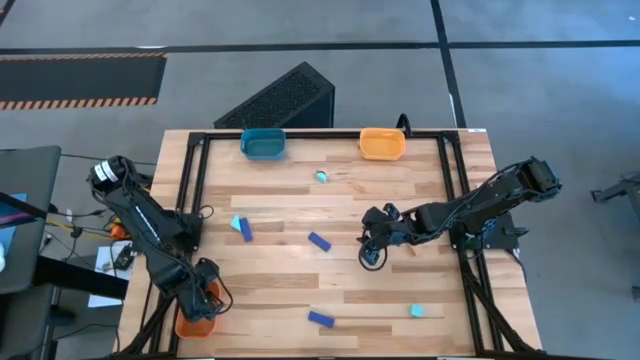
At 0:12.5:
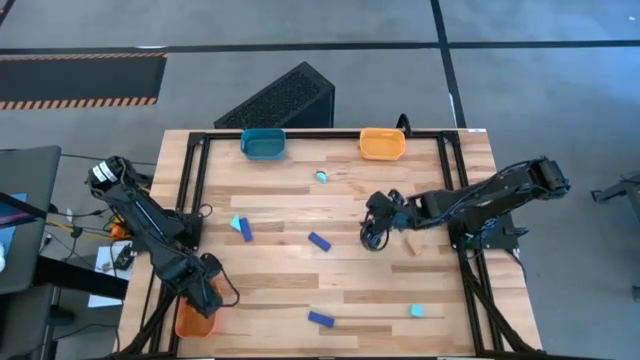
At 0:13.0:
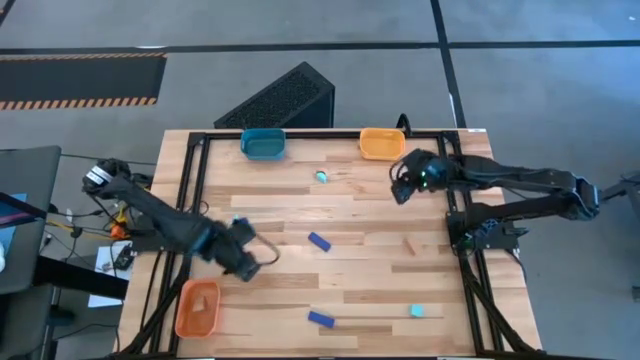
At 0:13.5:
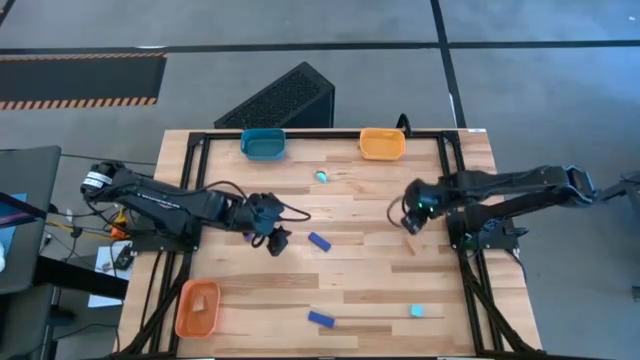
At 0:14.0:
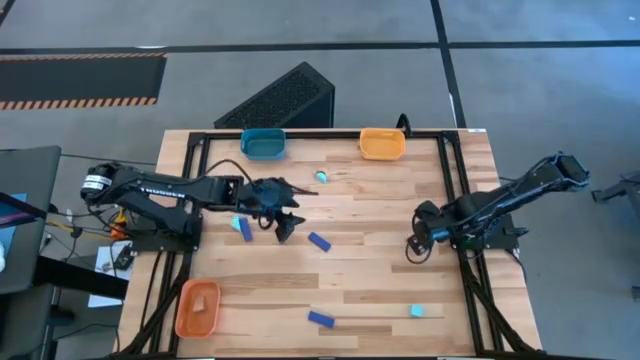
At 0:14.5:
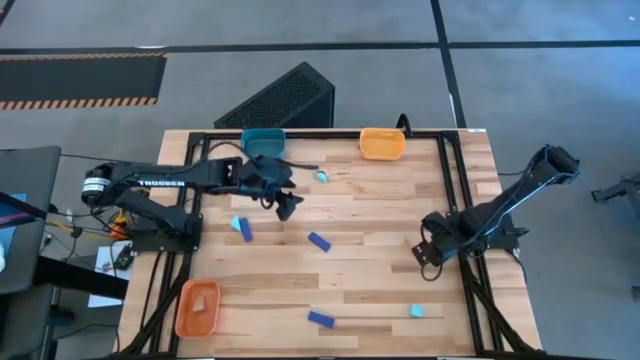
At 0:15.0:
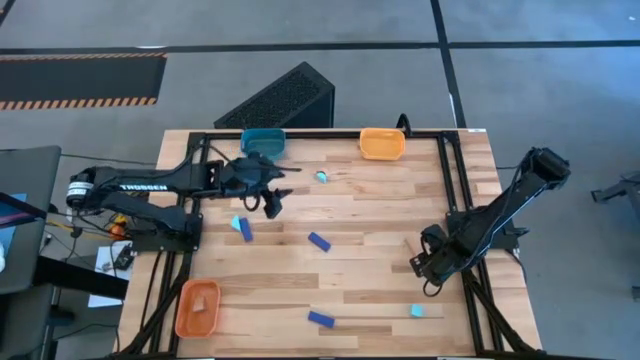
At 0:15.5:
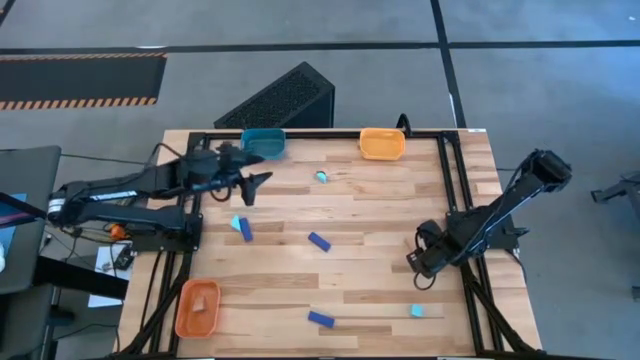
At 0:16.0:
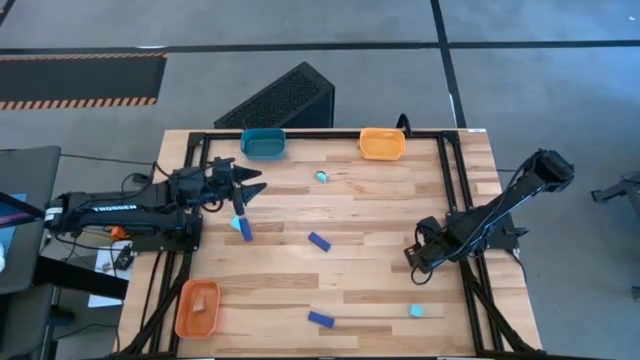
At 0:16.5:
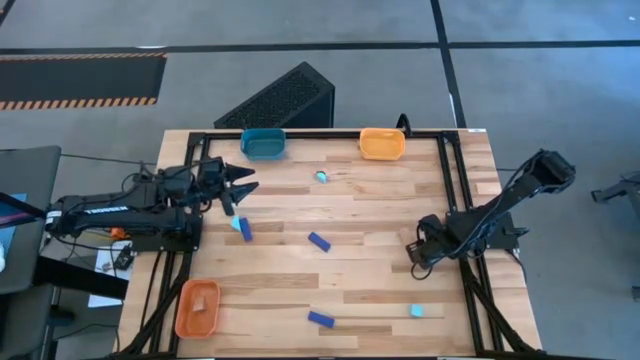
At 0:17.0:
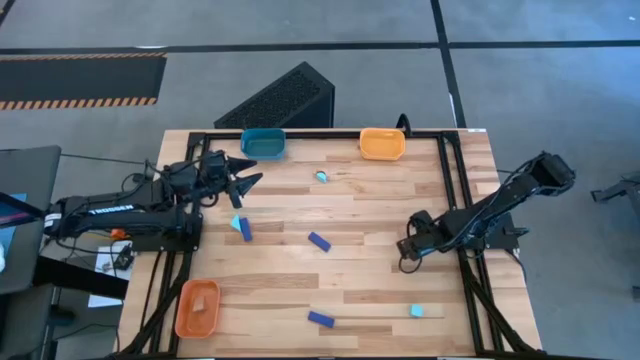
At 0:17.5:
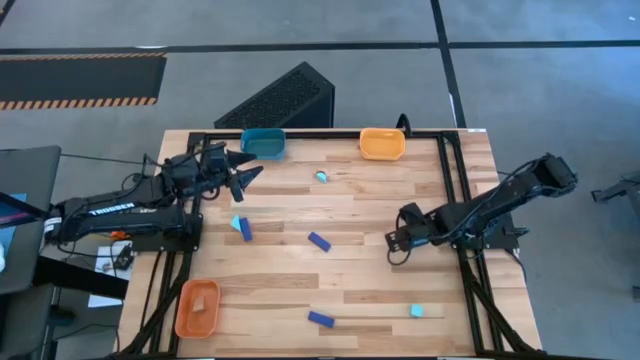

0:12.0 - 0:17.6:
Task: Sort & place blocks by color
Put the bottom brown block into the orange bin

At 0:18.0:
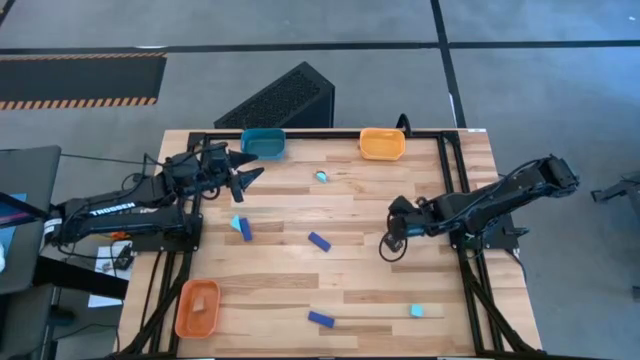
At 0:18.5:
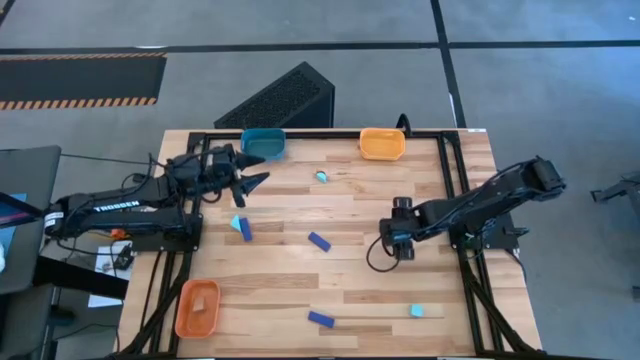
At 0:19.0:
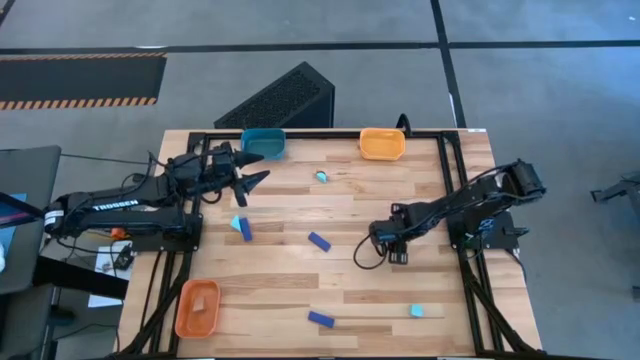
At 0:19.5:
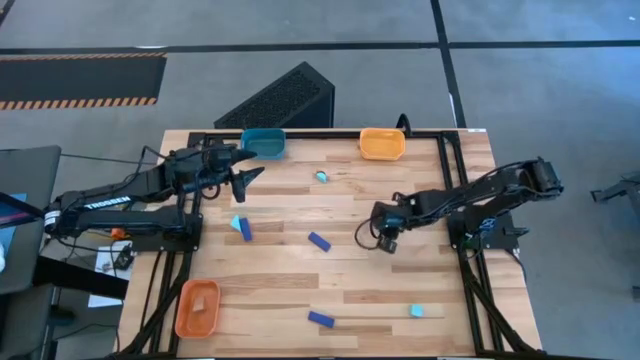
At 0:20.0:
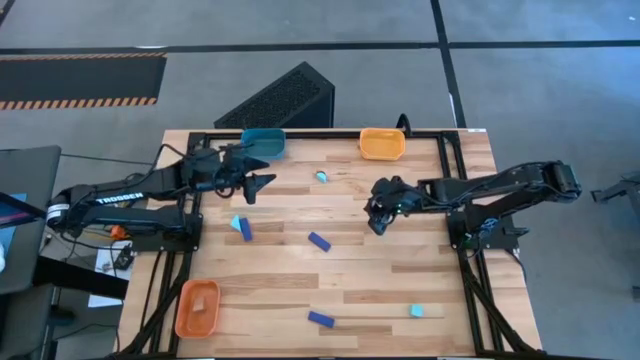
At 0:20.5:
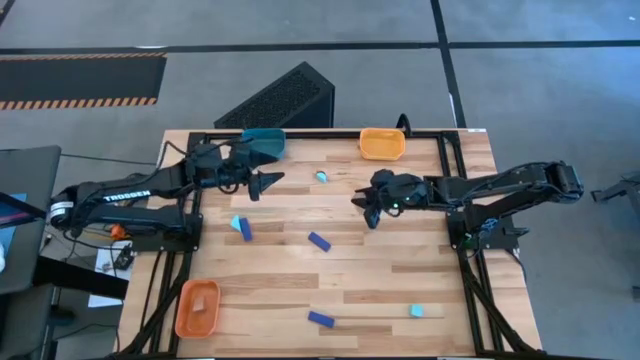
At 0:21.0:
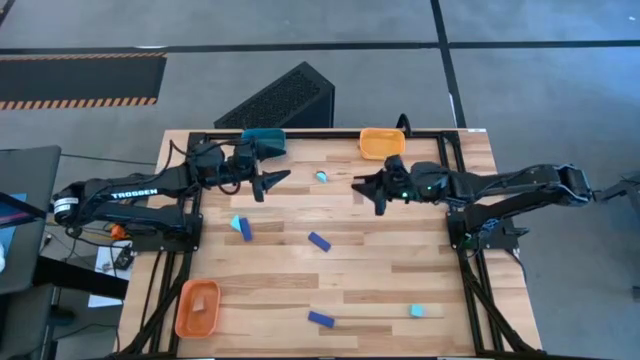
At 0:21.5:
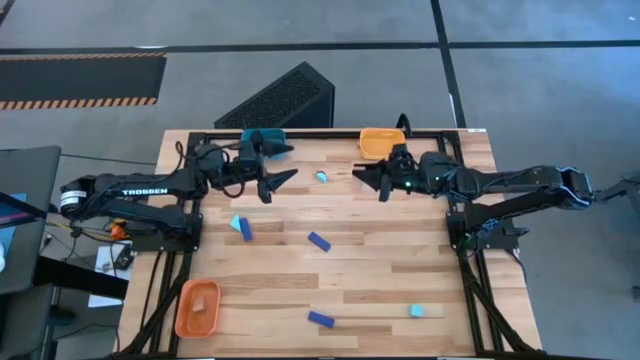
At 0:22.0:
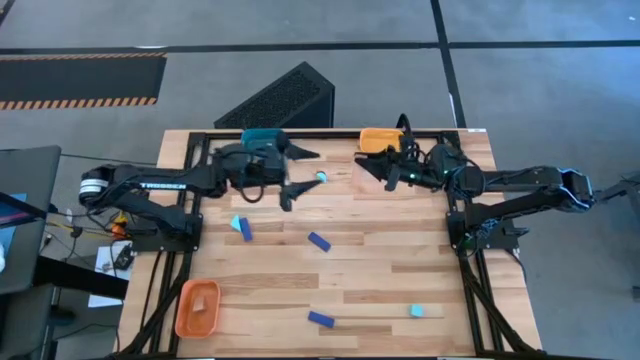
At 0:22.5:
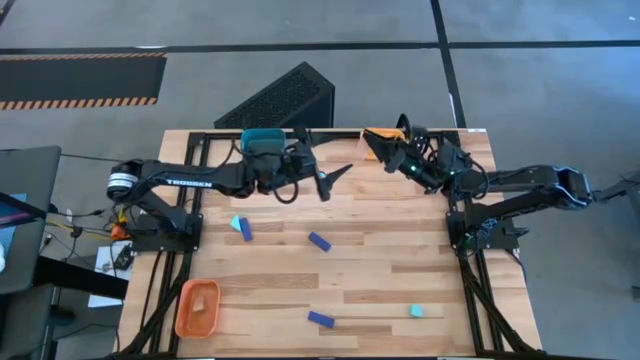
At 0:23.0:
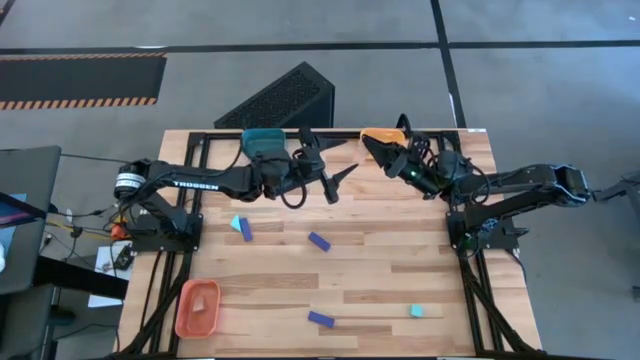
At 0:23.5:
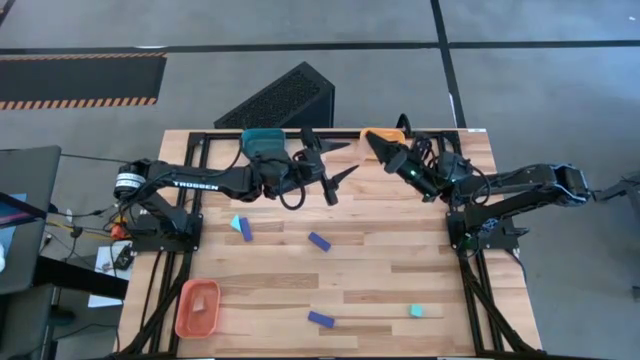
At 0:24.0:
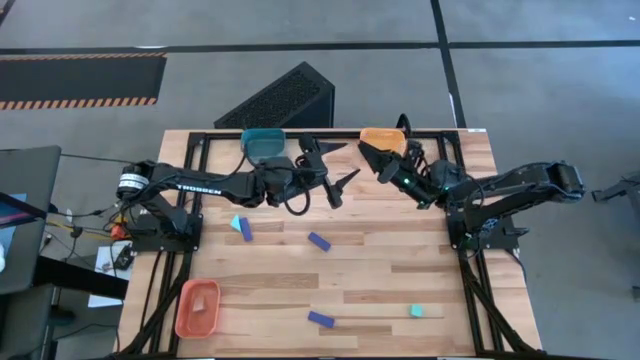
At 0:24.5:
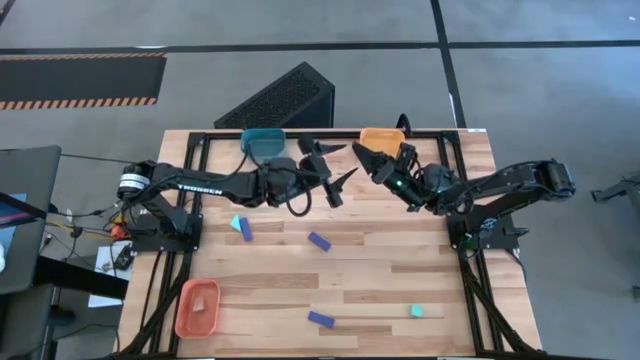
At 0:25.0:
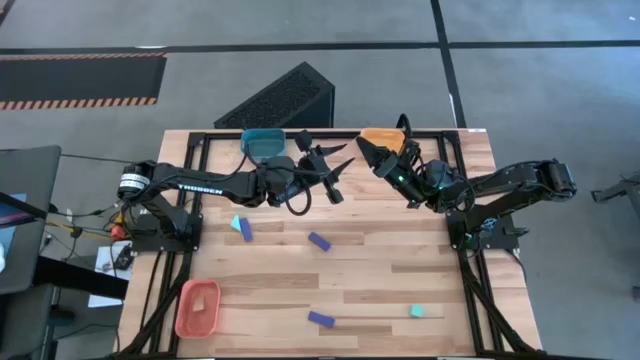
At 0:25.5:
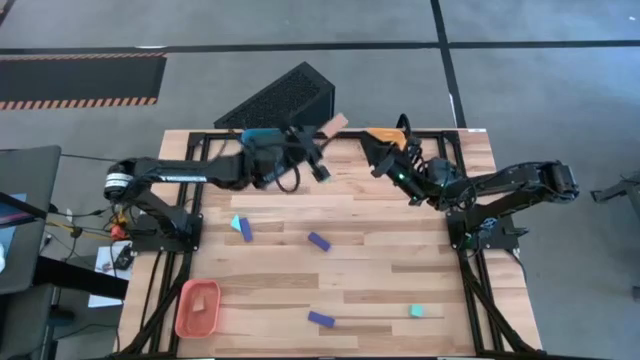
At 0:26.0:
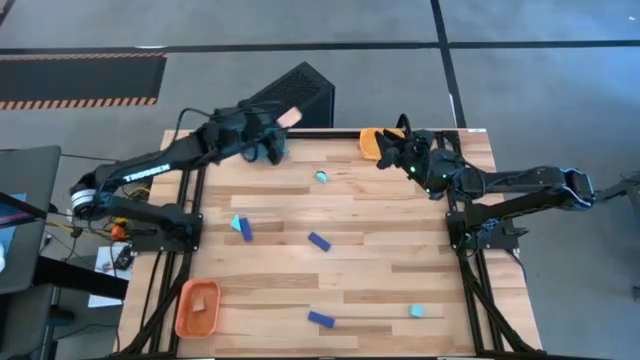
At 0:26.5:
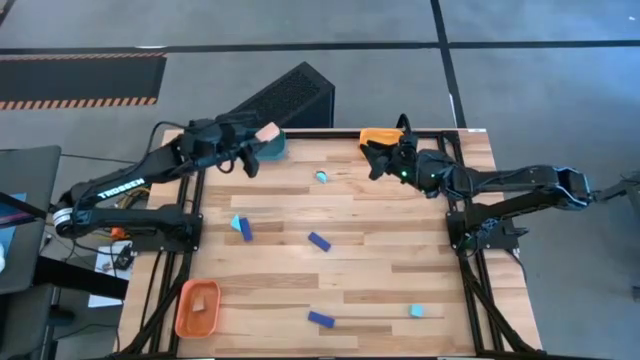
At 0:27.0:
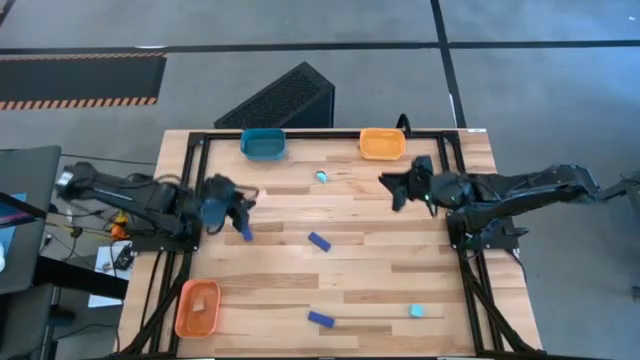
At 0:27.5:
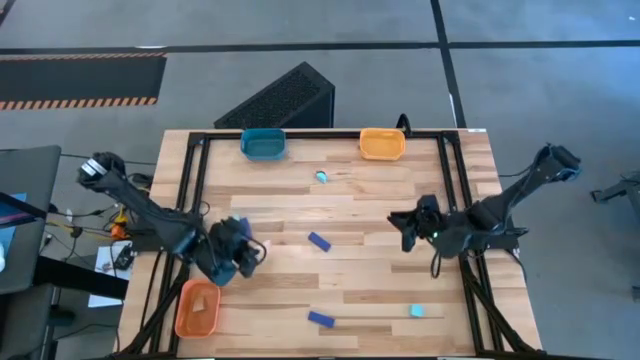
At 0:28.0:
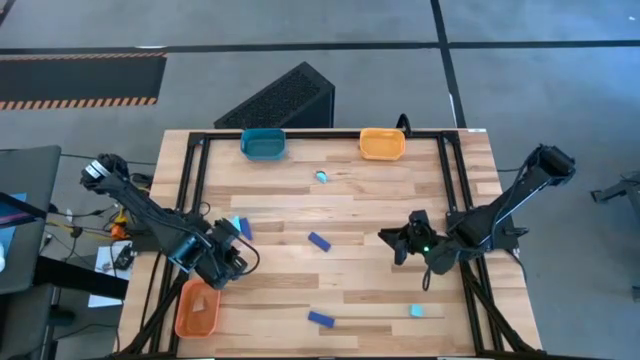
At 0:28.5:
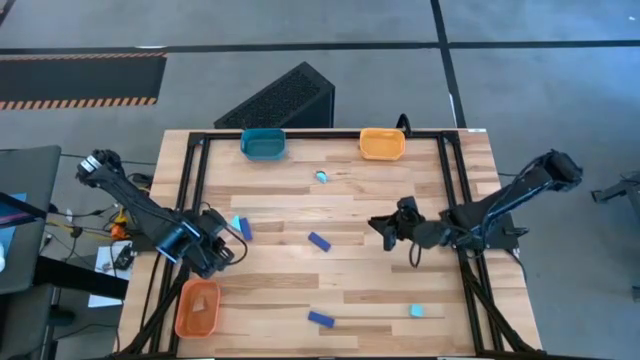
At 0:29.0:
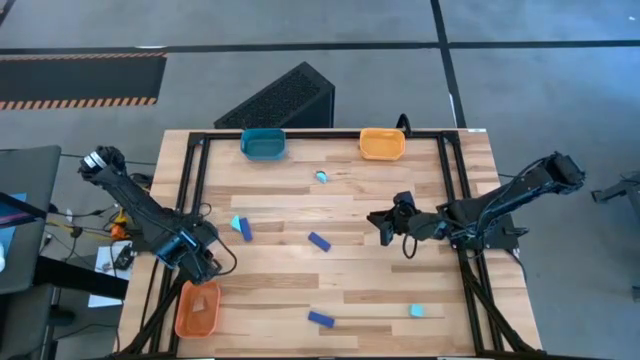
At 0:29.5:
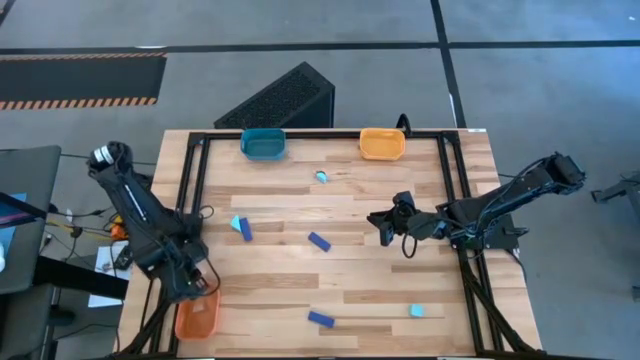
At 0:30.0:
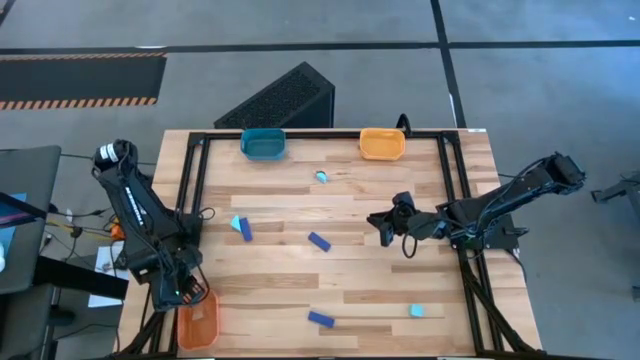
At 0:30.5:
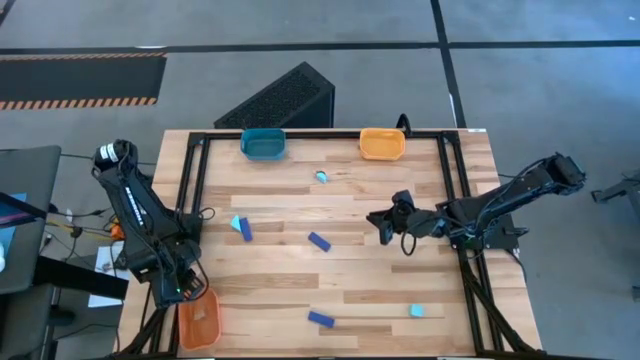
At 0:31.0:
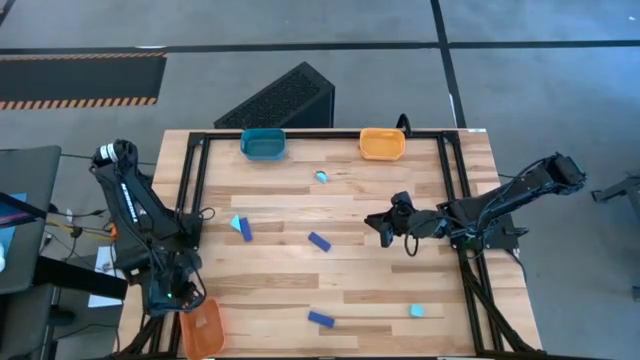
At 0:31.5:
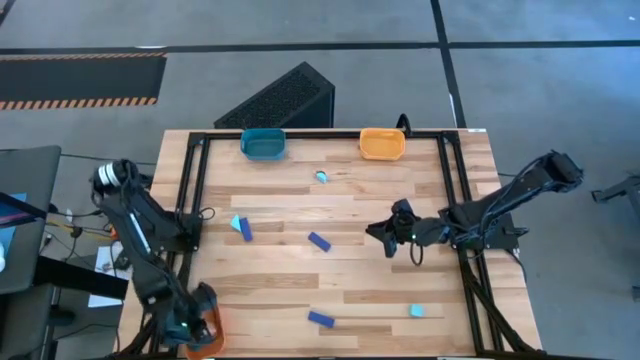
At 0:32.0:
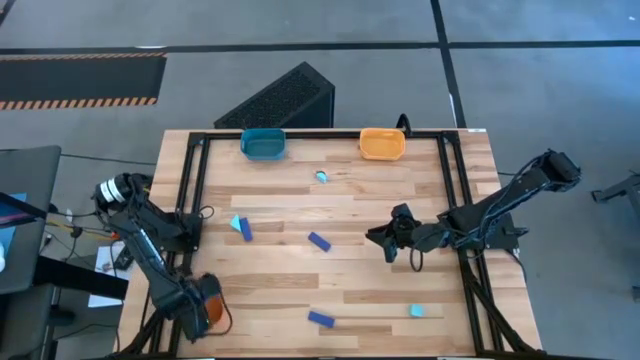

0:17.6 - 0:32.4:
Put the bottom brown block into the orange bin
